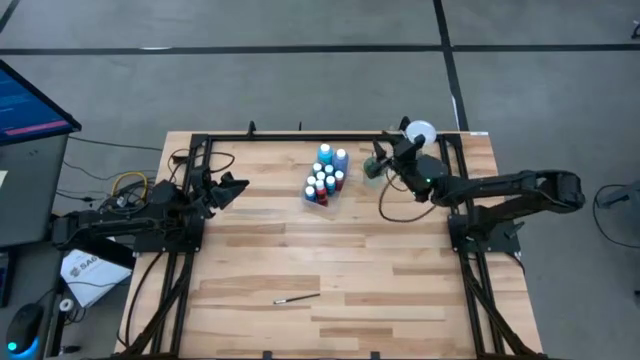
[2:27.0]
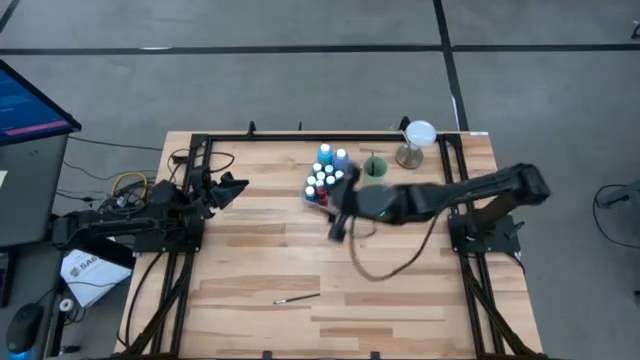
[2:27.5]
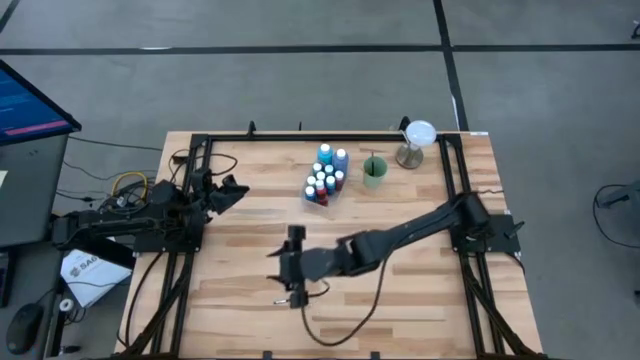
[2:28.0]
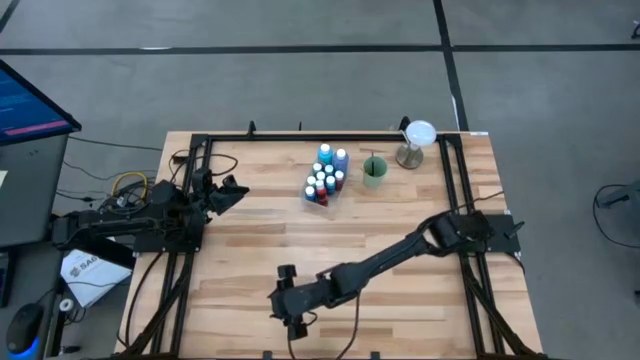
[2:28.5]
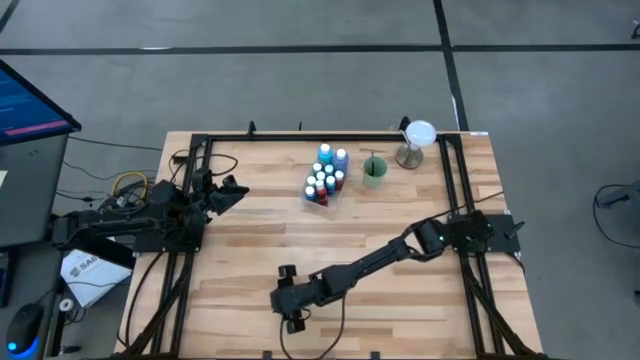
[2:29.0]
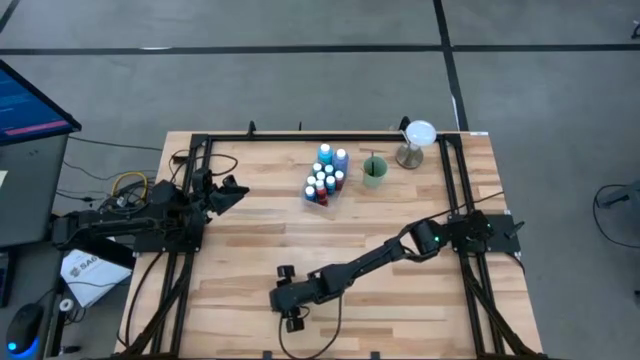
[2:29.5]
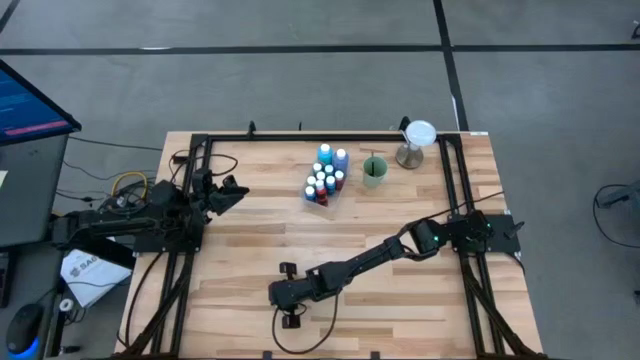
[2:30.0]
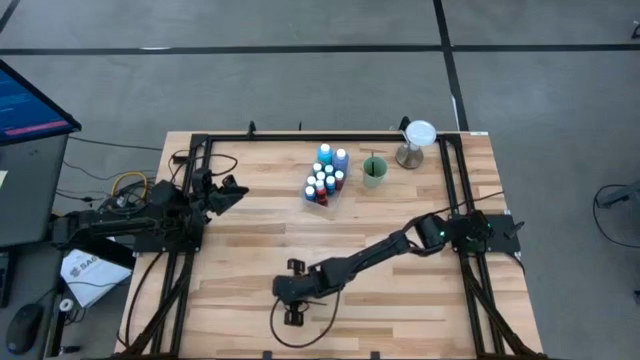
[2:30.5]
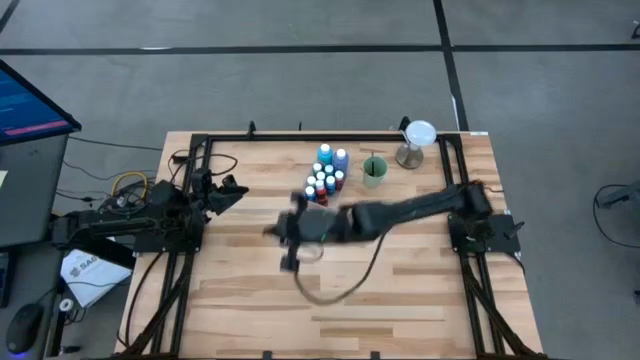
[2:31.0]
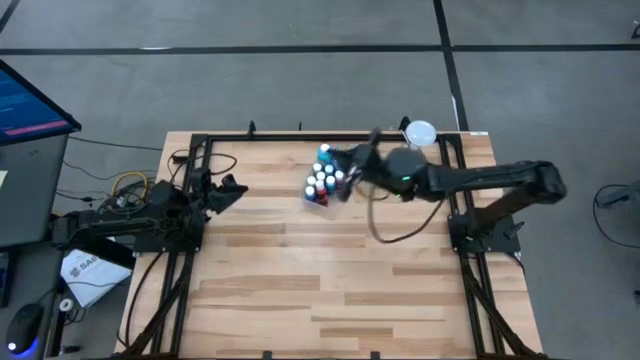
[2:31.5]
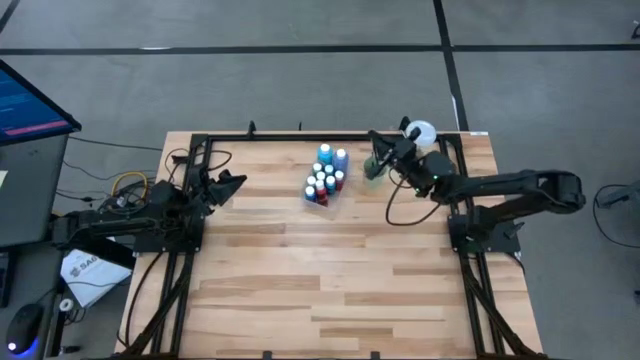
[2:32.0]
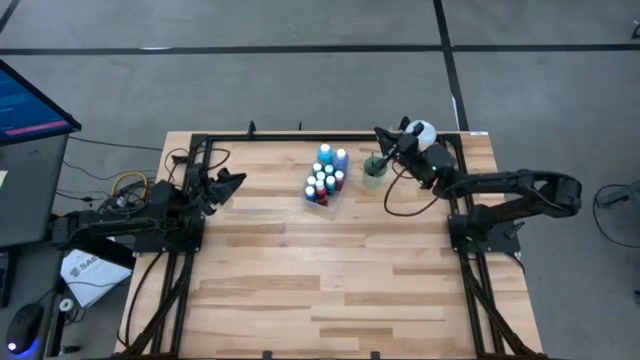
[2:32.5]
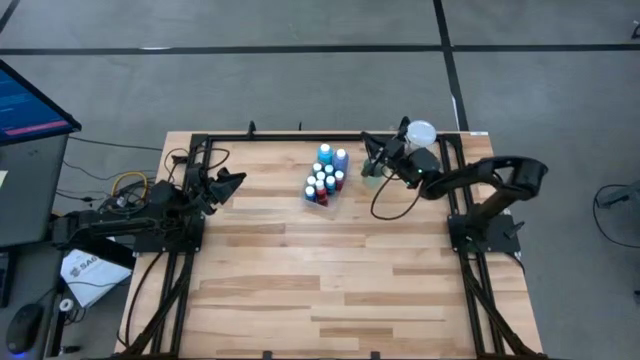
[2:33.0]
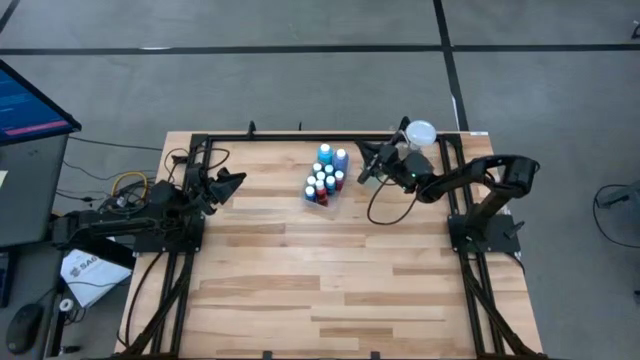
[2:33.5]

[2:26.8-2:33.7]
Task: Pick & Place Paint Supplies
Put the black paint brush into the green cup

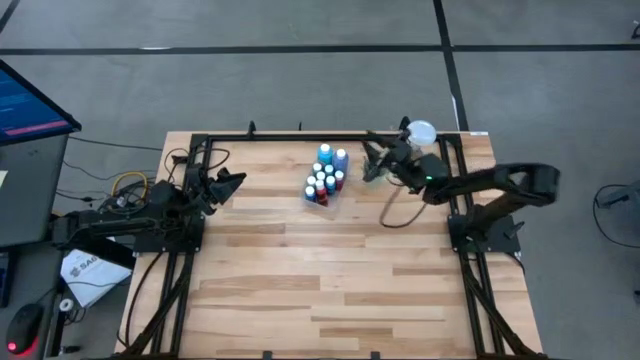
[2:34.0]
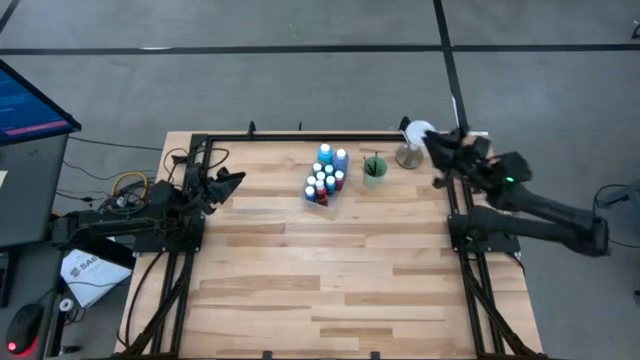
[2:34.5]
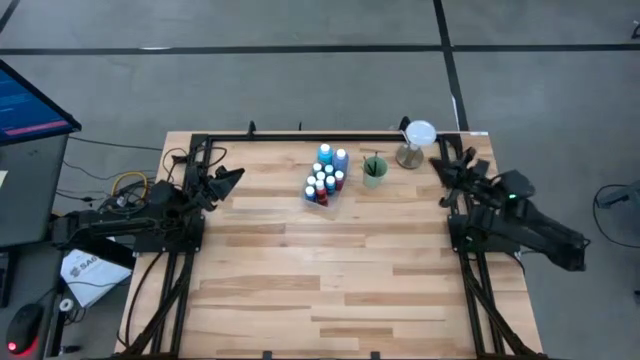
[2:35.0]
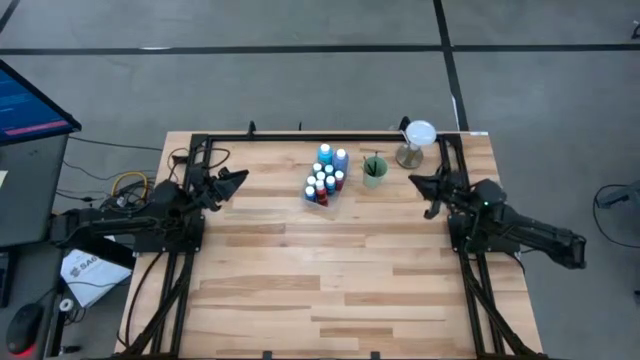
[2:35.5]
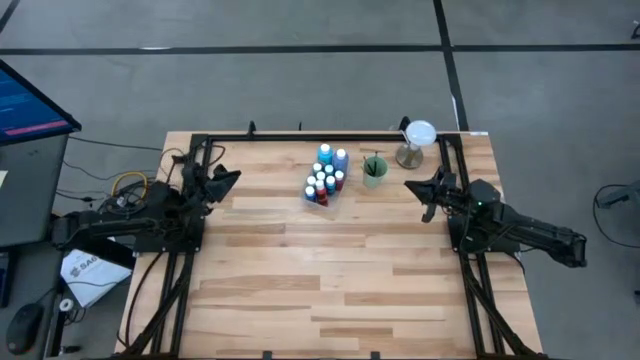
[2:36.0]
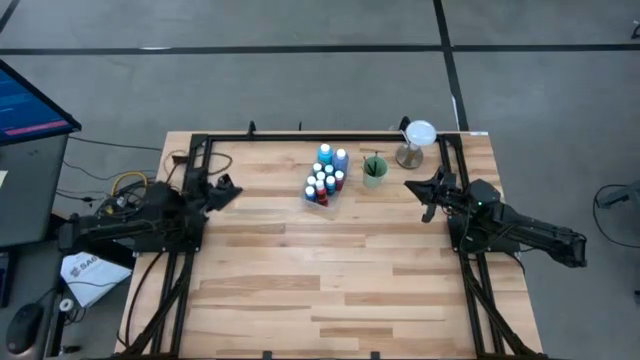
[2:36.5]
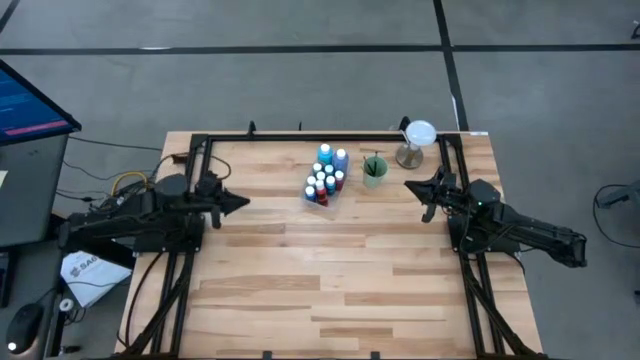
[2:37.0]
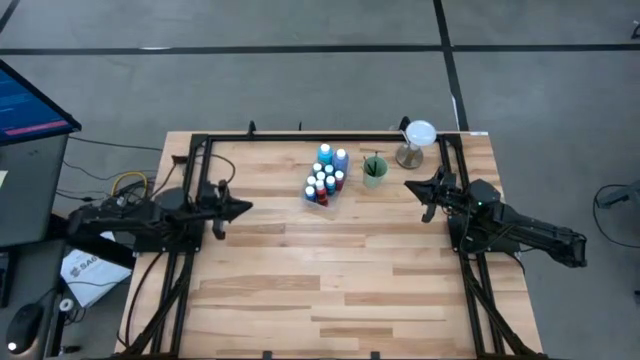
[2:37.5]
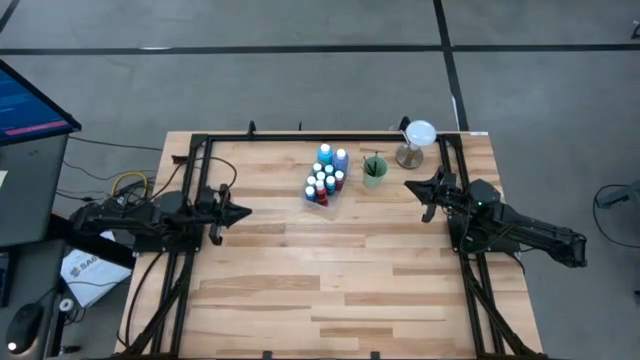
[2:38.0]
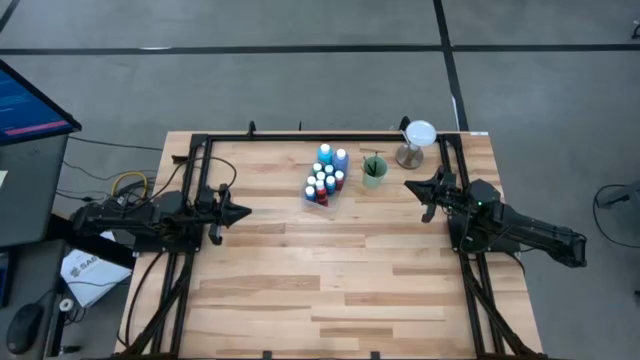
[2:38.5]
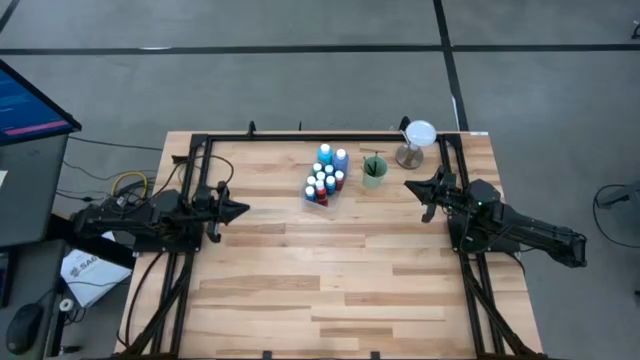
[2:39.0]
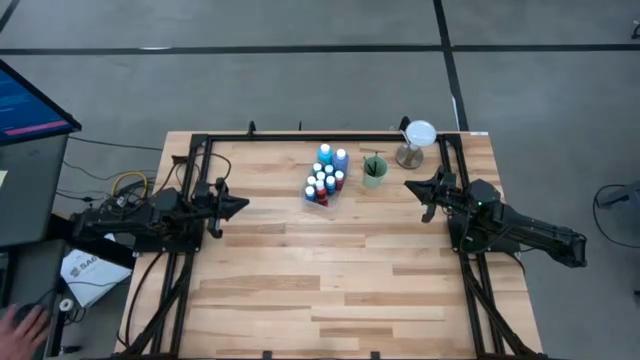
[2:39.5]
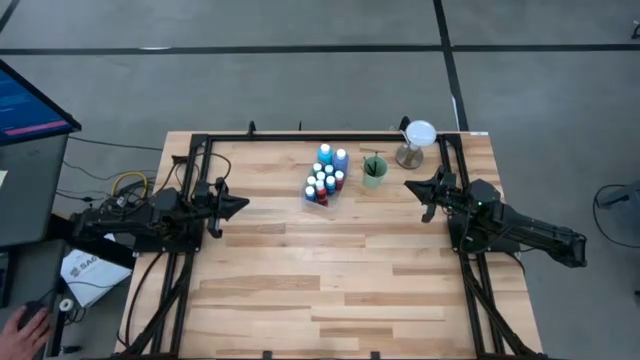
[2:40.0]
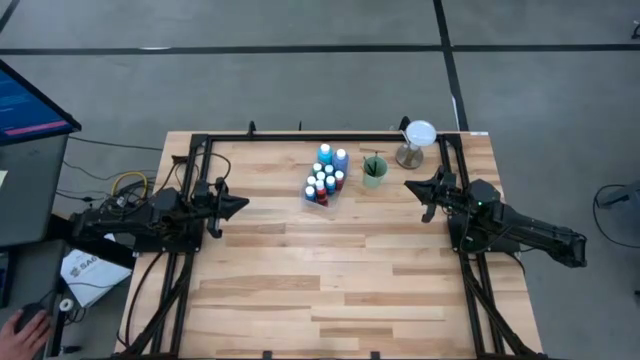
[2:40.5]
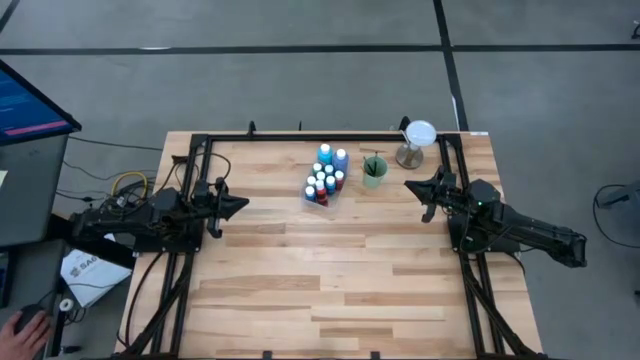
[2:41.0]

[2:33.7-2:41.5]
Return to Home Position

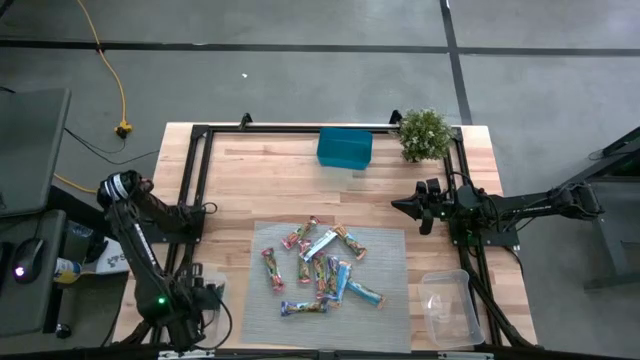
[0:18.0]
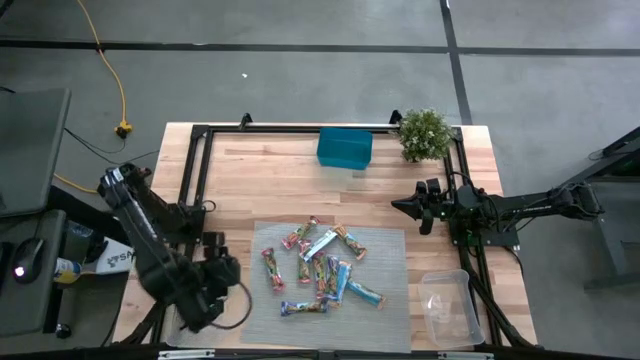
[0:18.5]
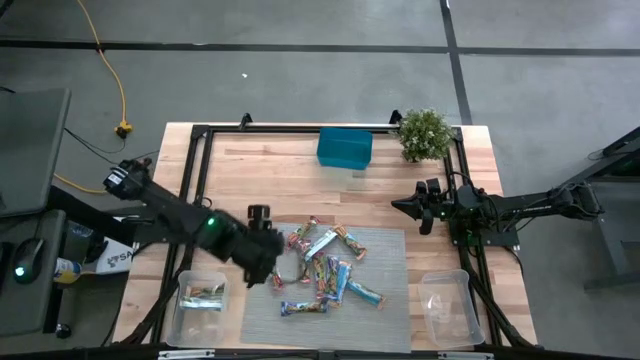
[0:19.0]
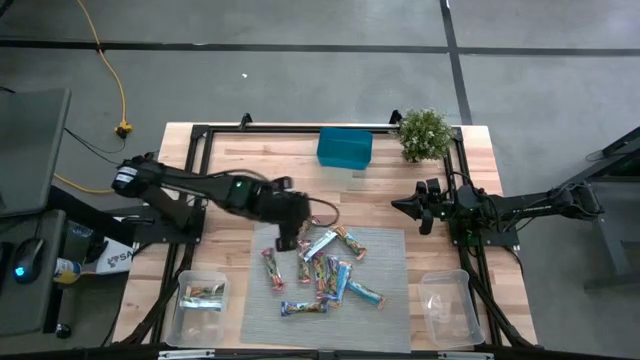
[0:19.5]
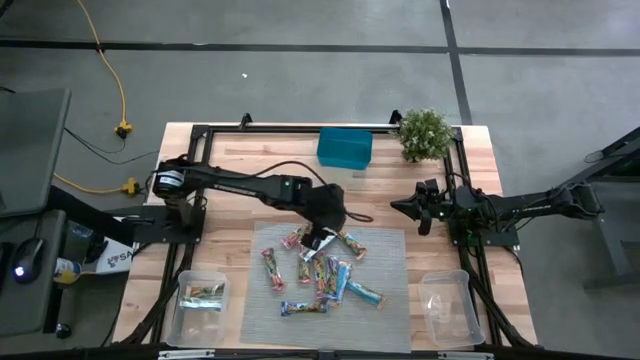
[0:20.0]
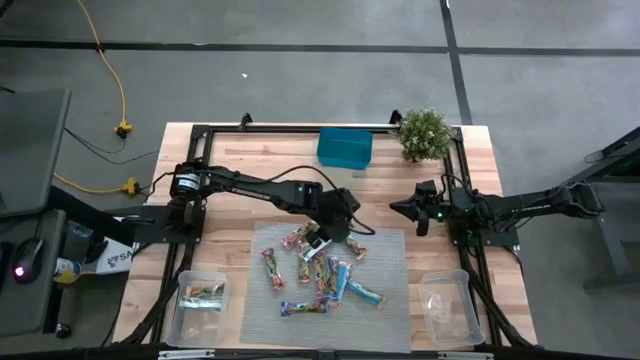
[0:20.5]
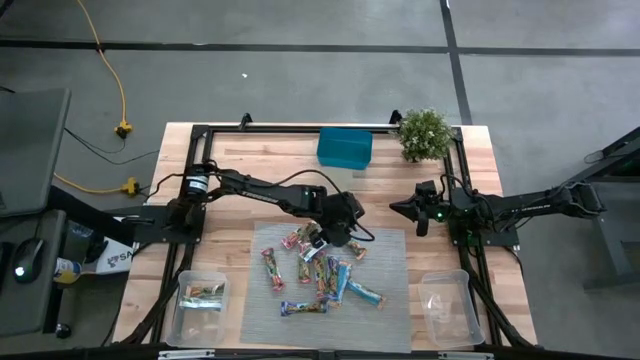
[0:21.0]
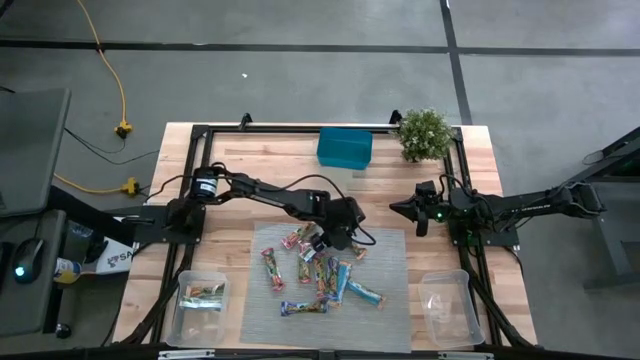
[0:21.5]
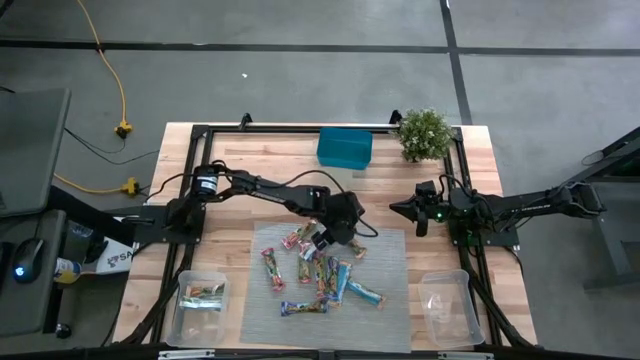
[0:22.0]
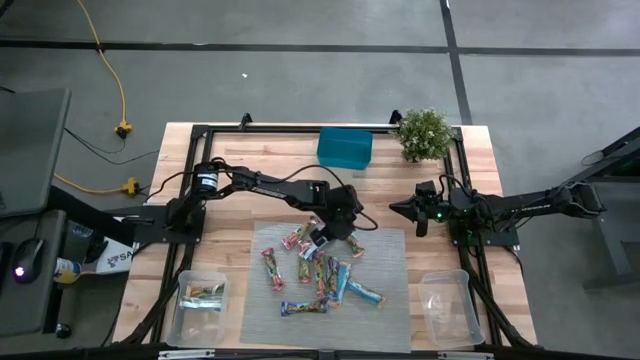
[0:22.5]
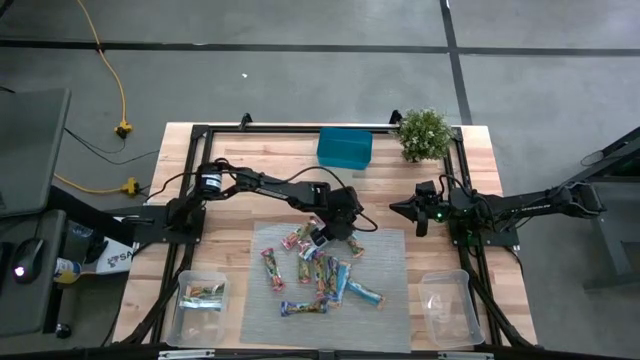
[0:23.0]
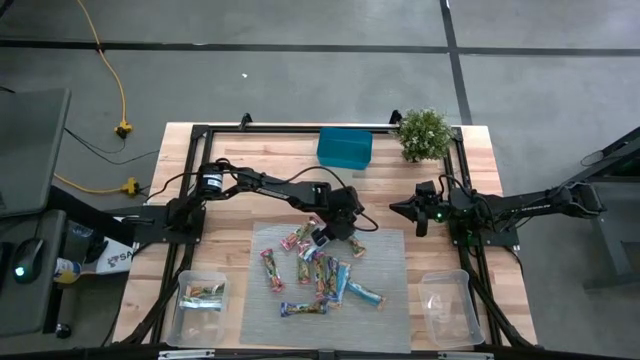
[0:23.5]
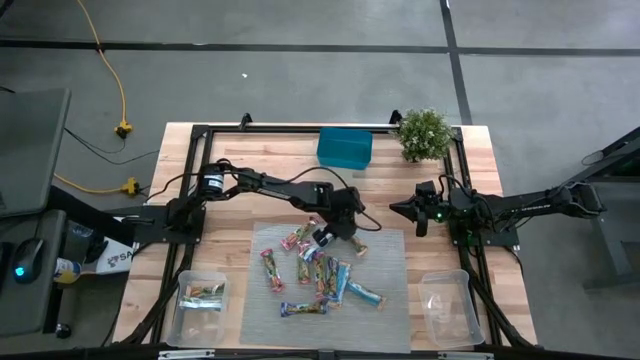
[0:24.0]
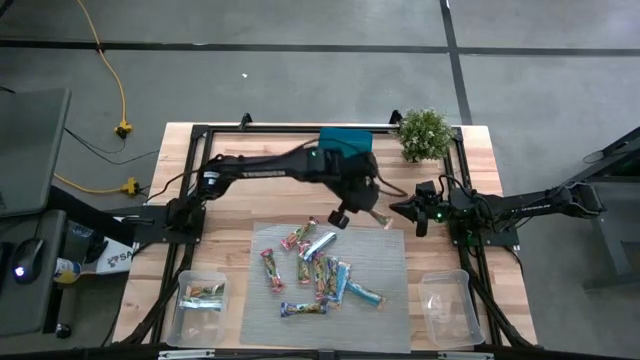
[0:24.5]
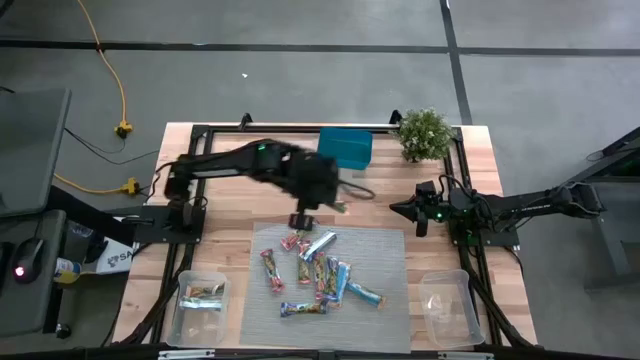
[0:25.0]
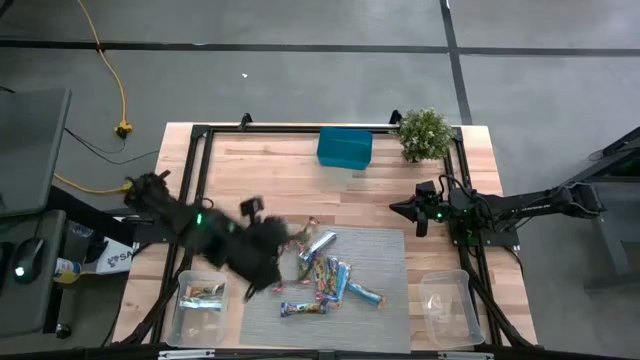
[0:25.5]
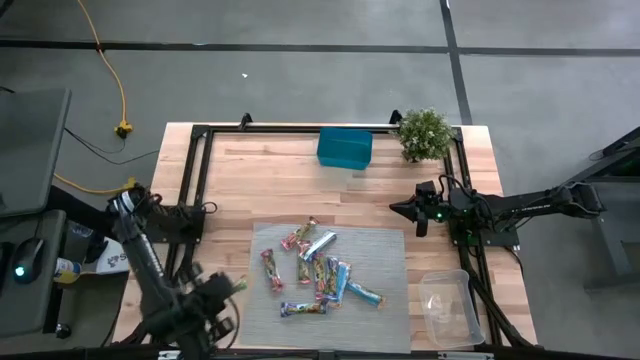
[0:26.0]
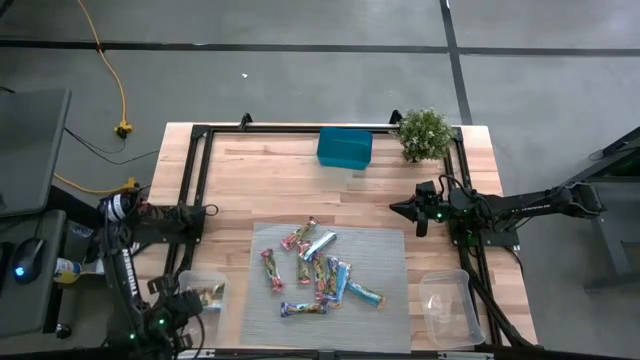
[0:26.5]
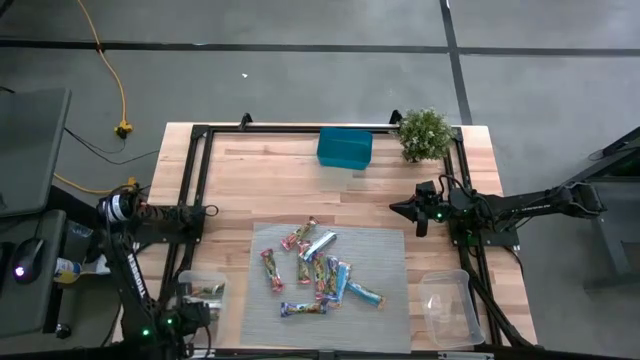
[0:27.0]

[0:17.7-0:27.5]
Task: Pick and place Granola Bars by type
Put the yellow granola bar into the left transparent bin
